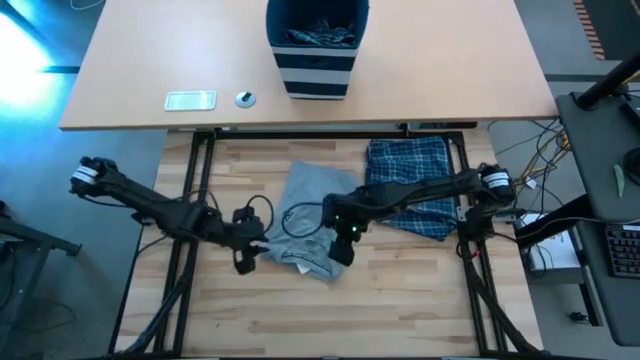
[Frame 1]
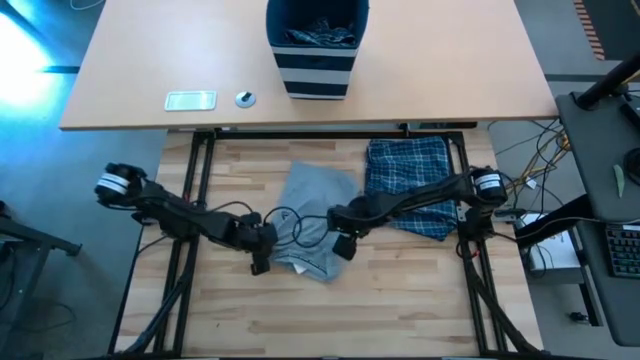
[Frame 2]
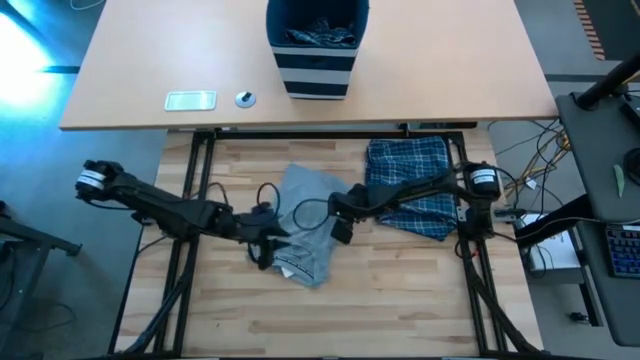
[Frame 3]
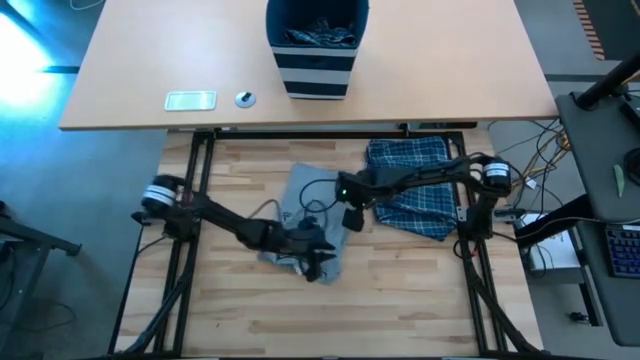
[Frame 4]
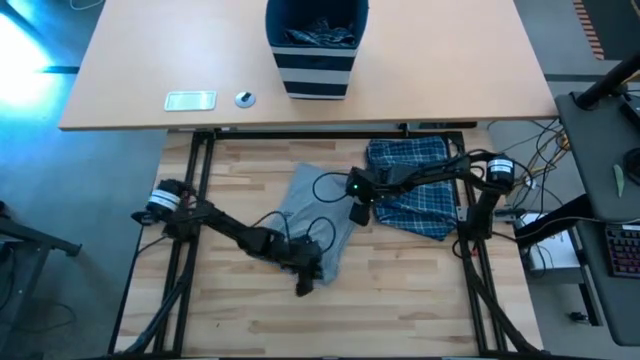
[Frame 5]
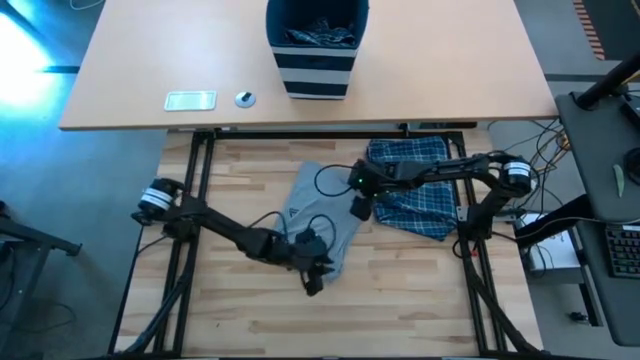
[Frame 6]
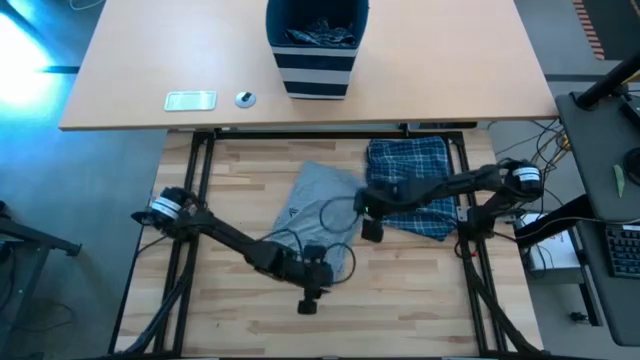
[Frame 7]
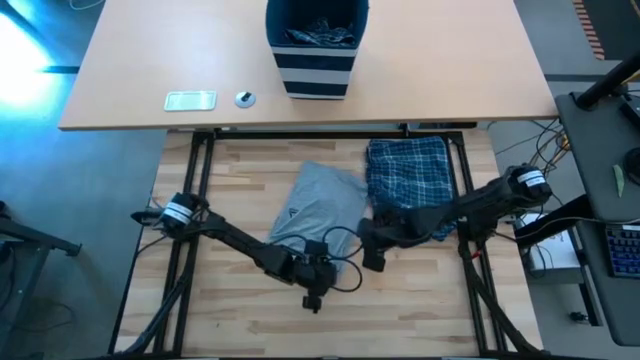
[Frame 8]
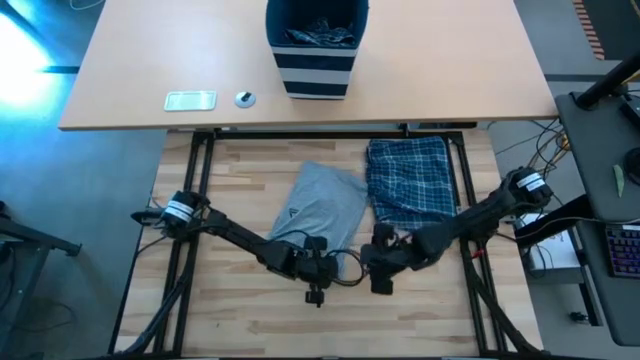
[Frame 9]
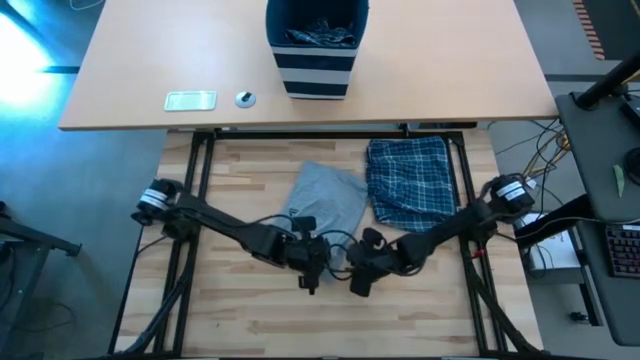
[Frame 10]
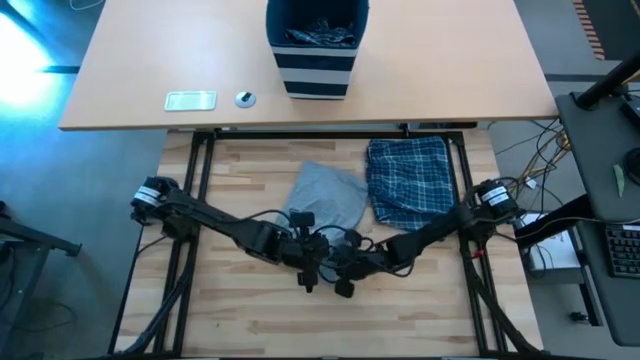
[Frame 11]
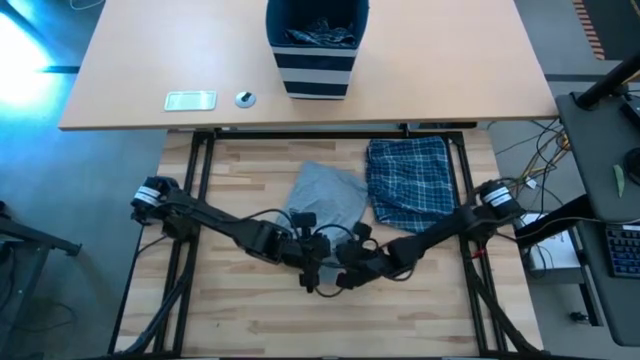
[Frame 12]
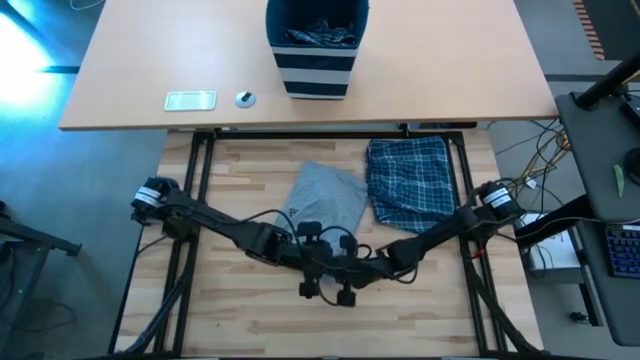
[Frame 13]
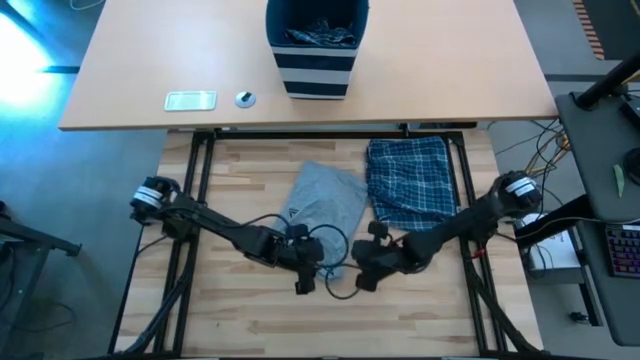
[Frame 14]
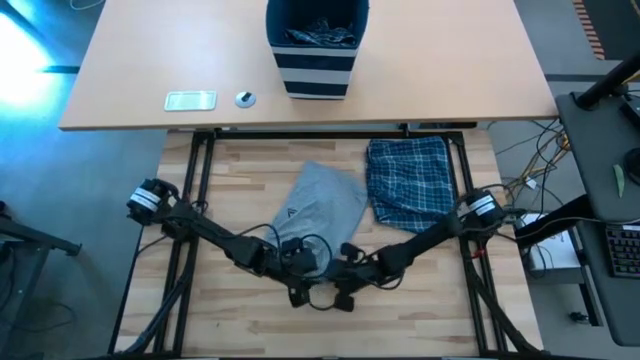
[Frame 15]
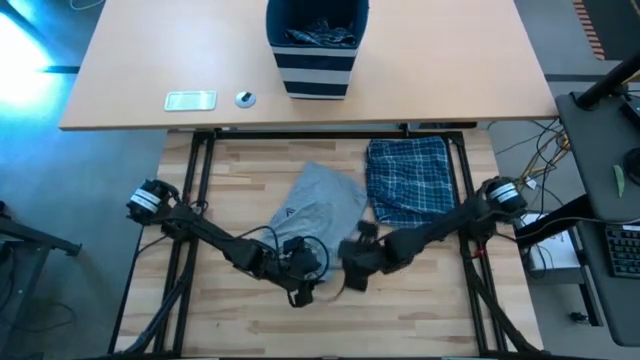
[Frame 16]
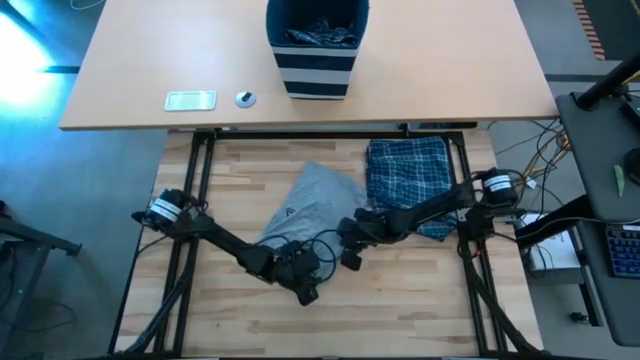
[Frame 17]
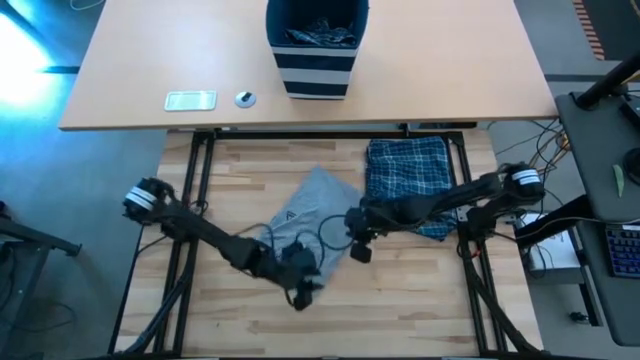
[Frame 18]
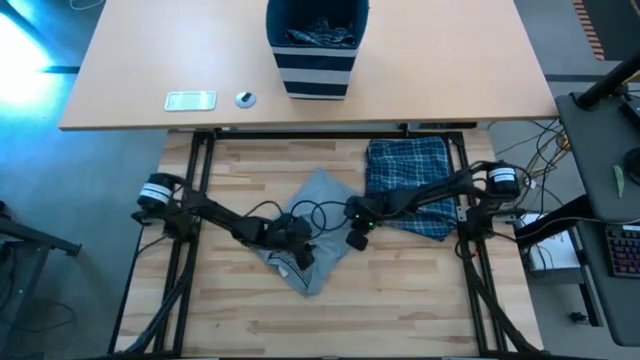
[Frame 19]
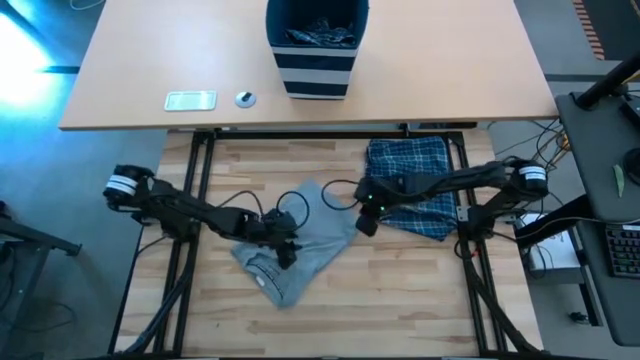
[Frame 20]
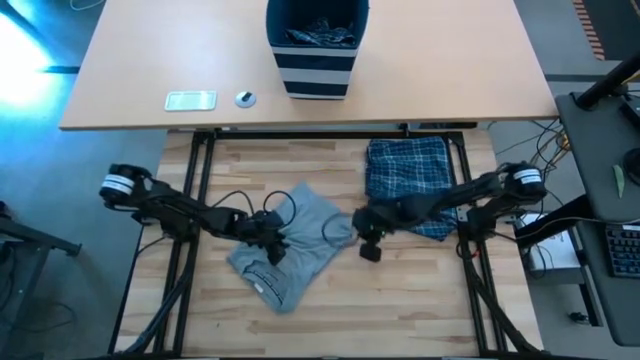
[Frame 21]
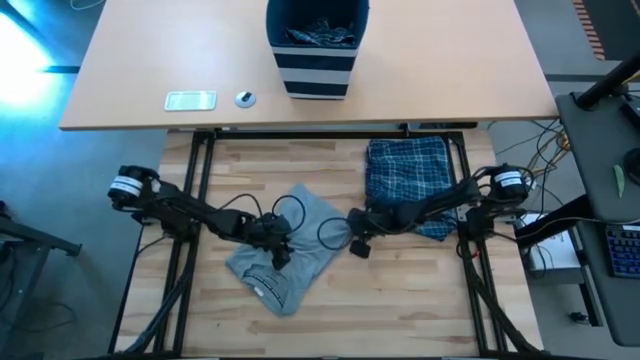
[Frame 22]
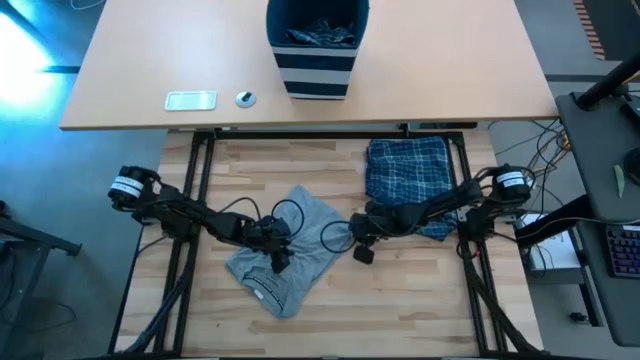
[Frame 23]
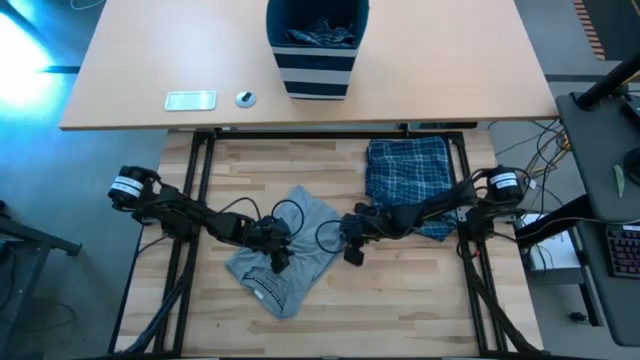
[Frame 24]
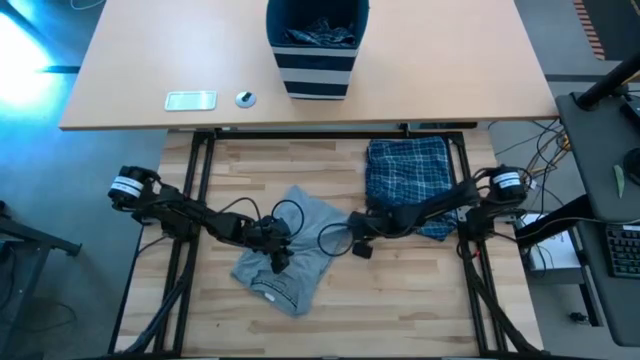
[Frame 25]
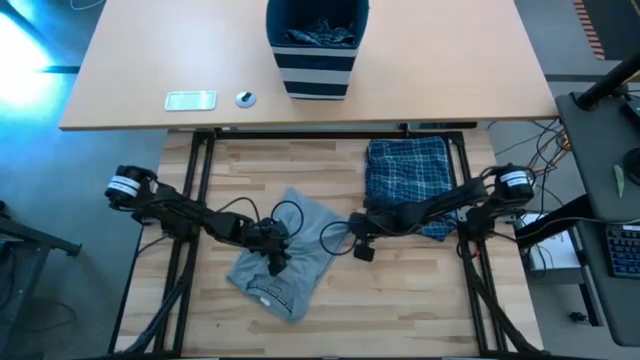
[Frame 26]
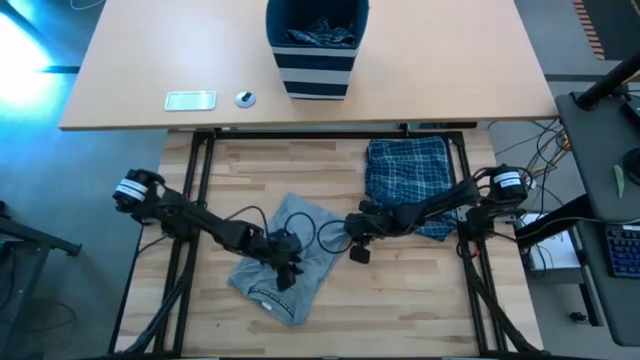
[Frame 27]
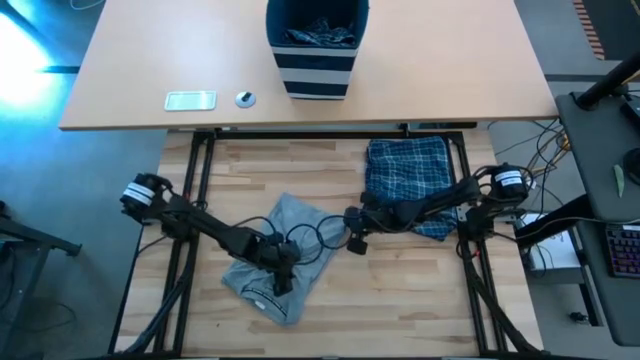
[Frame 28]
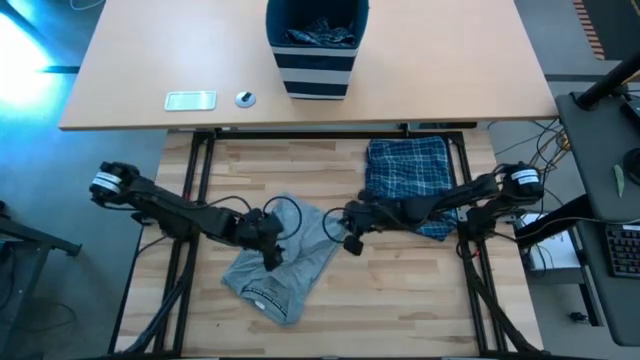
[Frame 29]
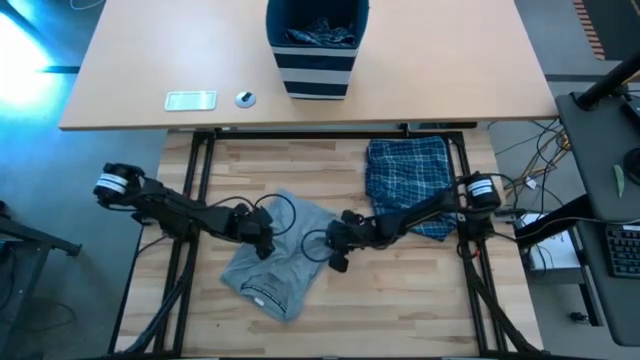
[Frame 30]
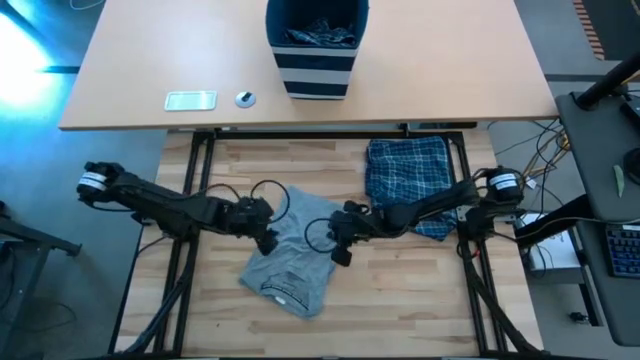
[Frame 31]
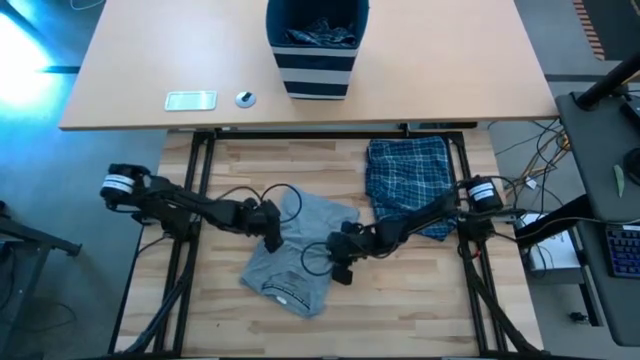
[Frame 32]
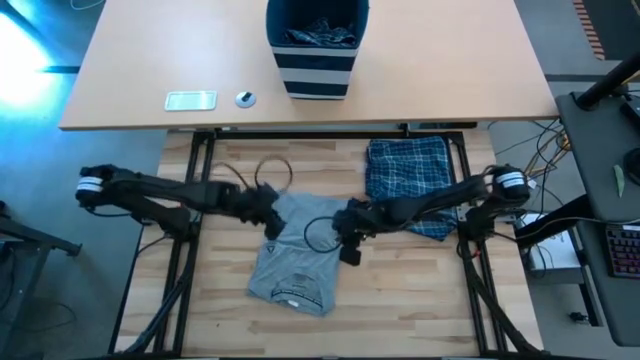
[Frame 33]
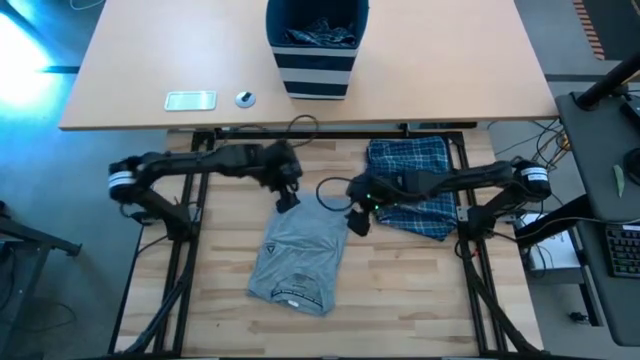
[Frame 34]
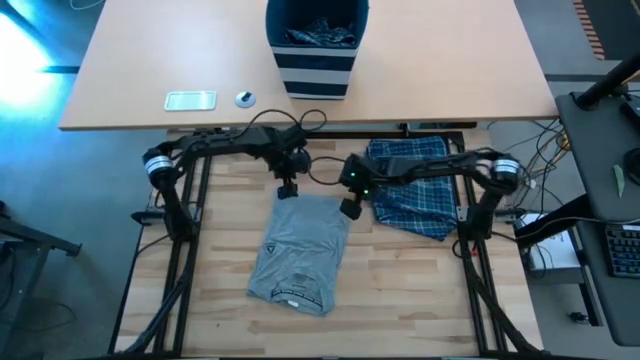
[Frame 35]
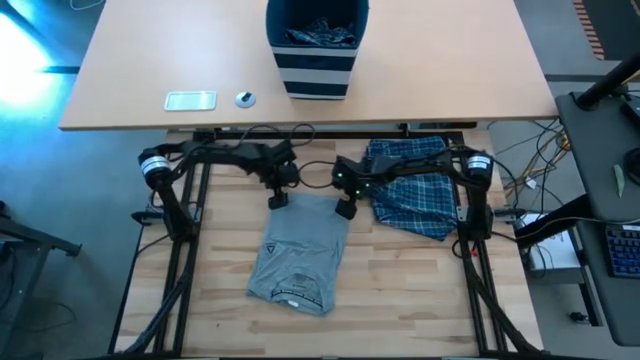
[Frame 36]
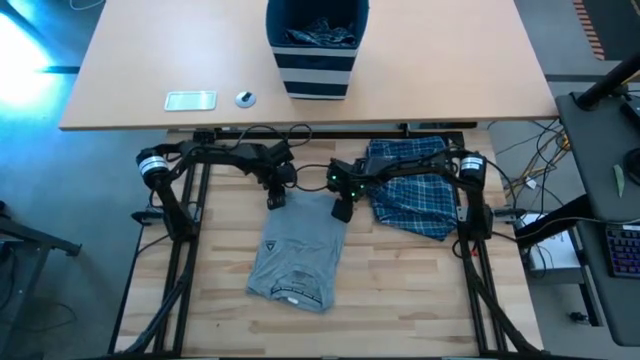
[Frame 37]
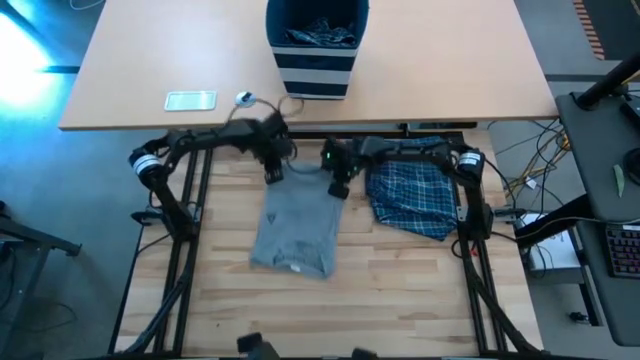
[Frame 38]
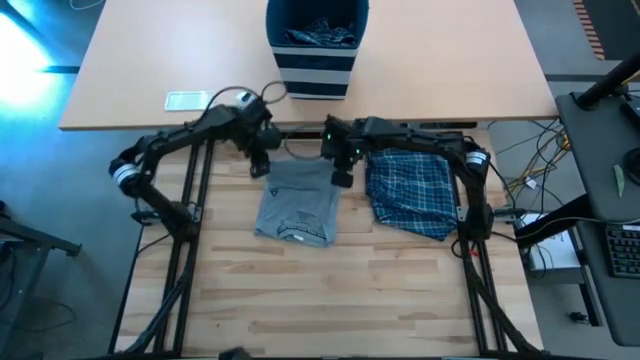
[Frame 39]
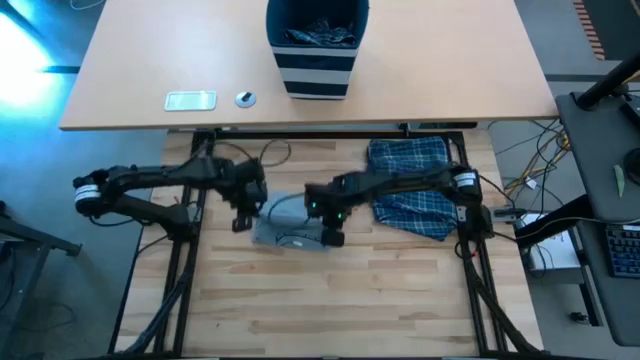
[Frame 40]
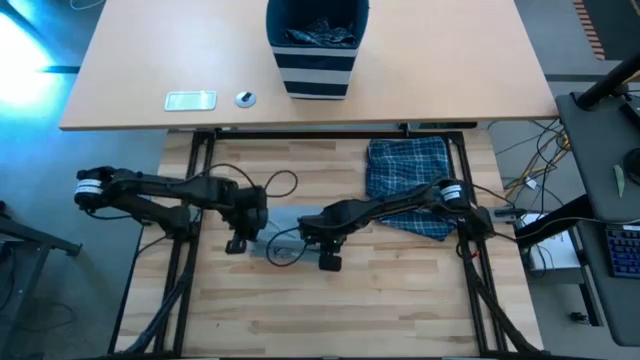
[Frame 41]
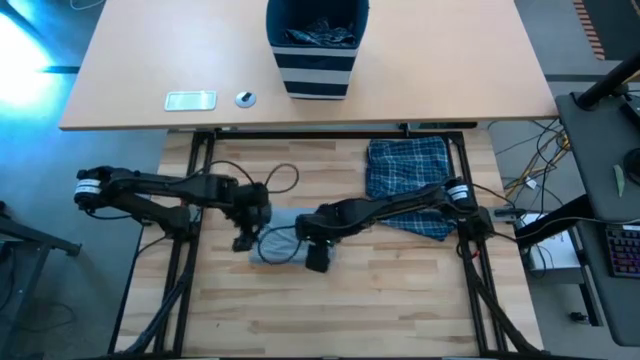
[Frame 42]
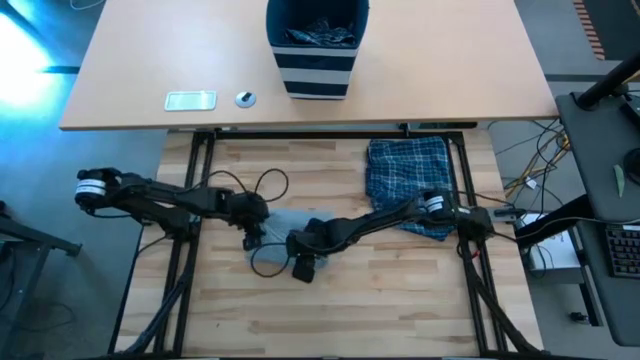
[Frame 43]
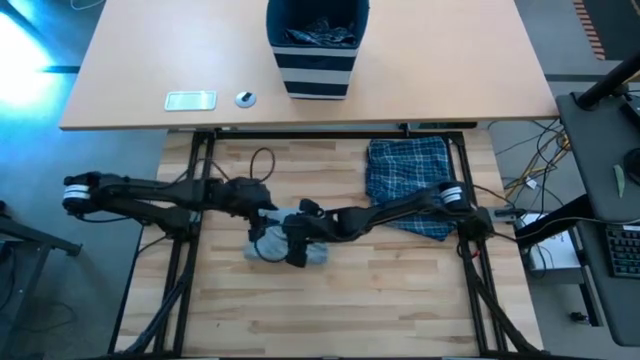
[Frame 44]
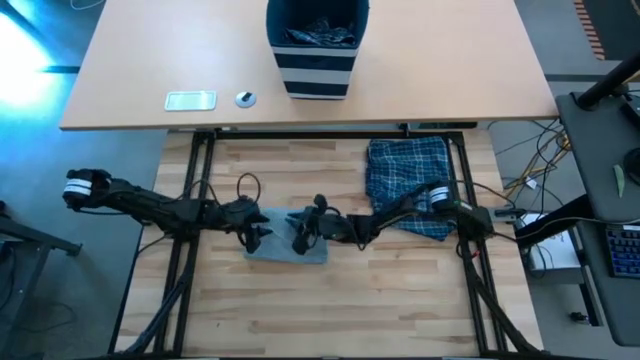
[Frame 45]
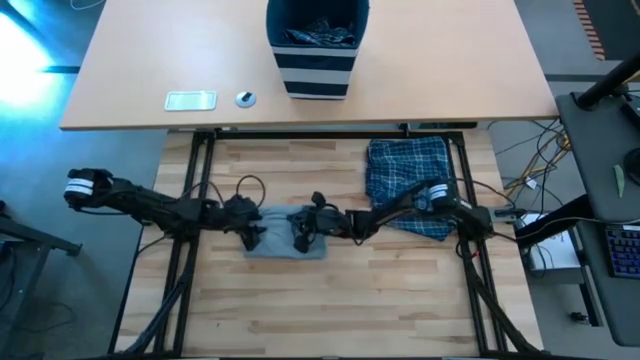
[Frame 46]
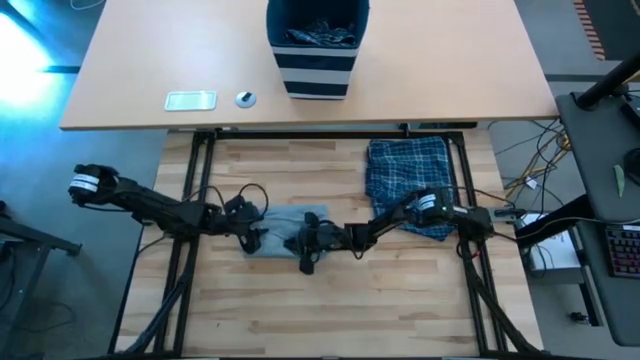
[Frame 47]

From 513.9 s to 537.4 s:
Task: Fold Laundry from Bin
Fold the gray shirt
